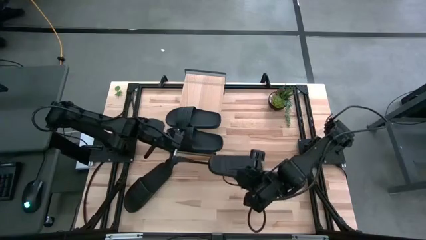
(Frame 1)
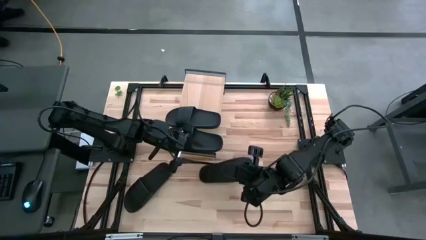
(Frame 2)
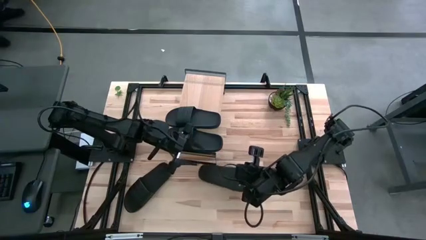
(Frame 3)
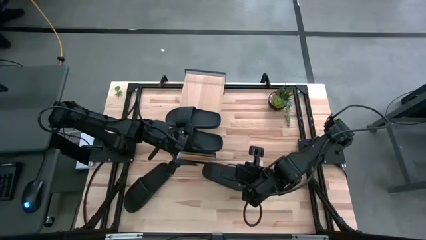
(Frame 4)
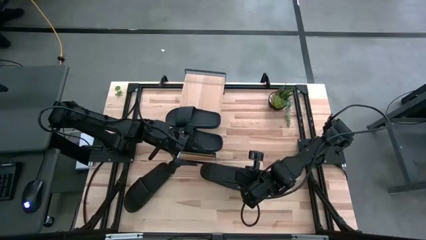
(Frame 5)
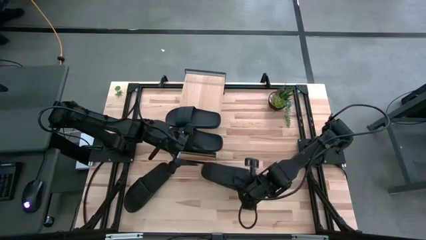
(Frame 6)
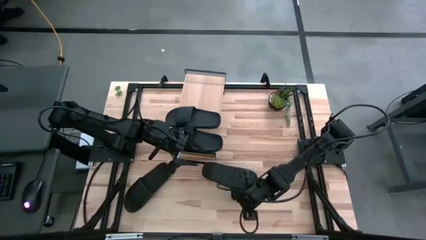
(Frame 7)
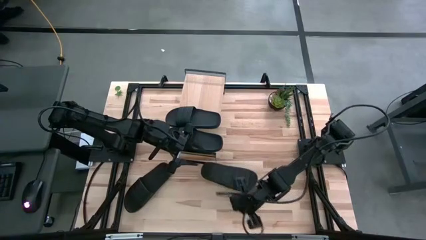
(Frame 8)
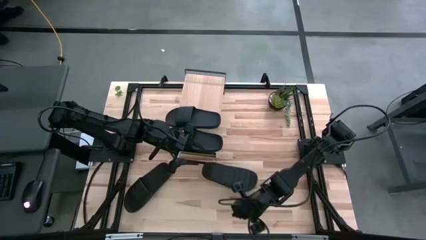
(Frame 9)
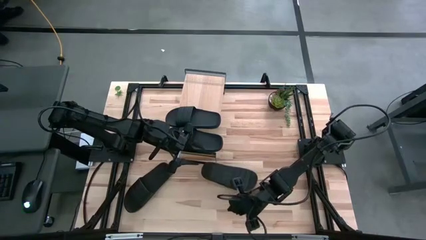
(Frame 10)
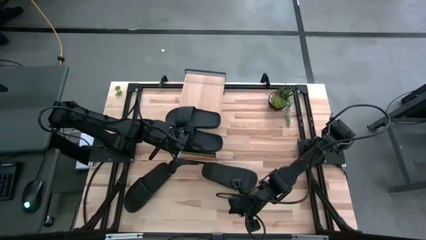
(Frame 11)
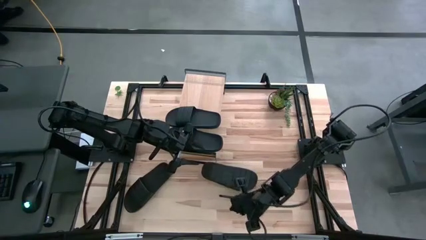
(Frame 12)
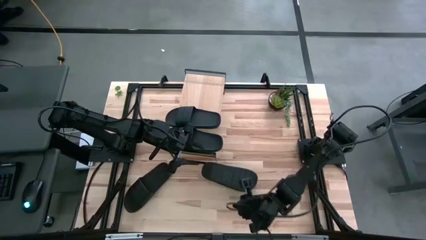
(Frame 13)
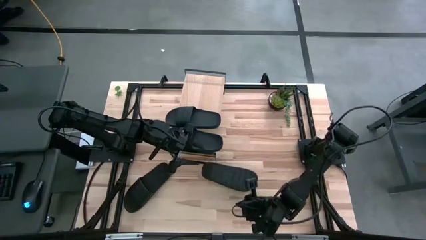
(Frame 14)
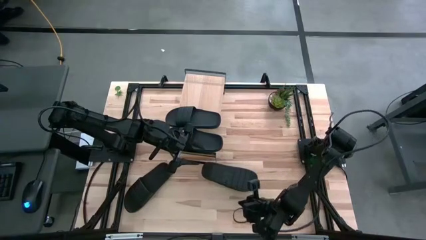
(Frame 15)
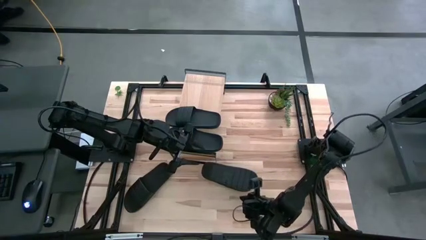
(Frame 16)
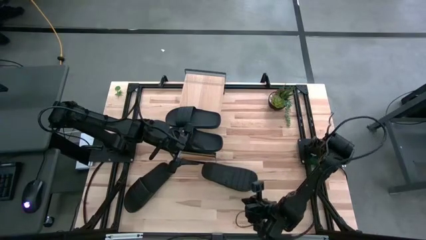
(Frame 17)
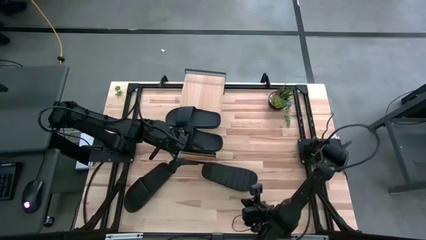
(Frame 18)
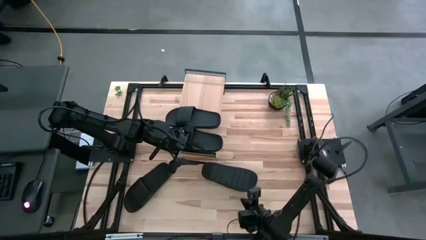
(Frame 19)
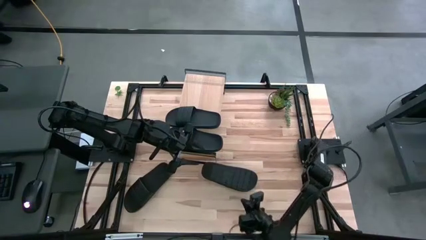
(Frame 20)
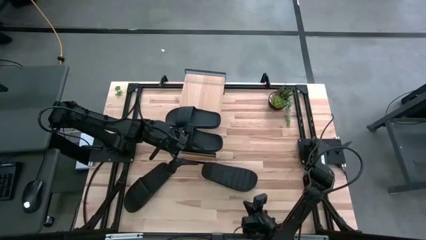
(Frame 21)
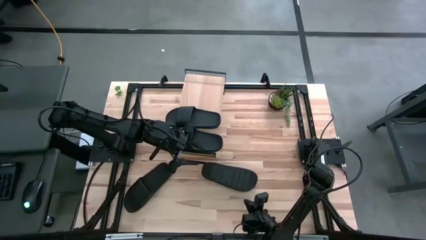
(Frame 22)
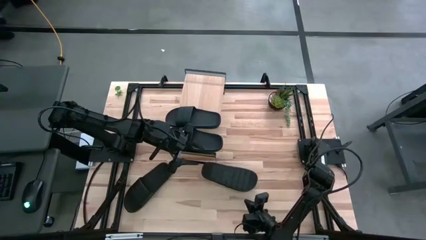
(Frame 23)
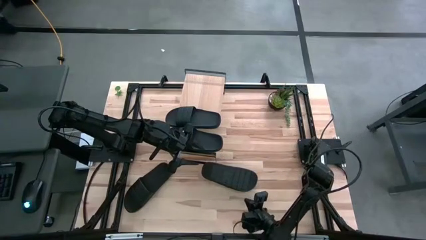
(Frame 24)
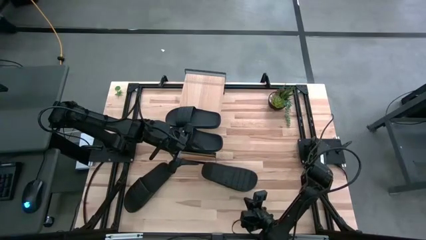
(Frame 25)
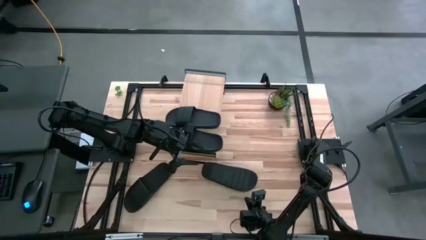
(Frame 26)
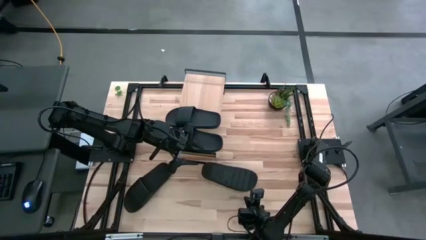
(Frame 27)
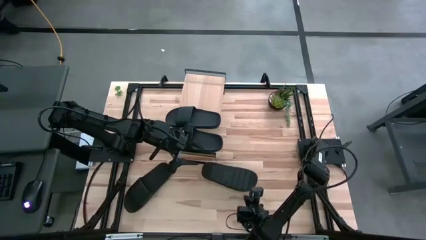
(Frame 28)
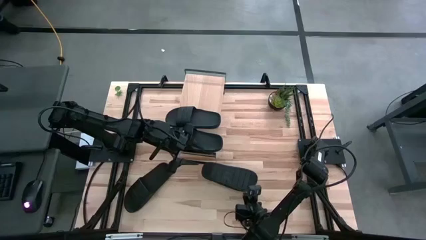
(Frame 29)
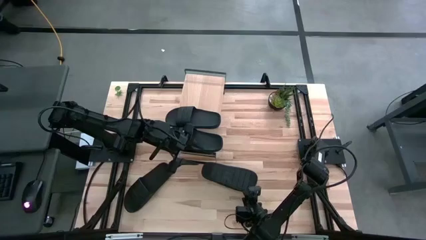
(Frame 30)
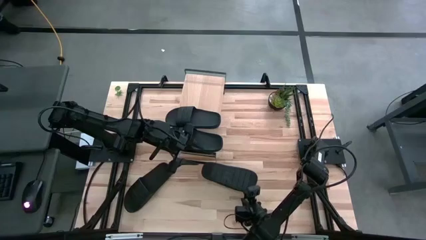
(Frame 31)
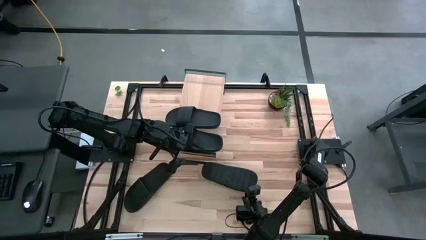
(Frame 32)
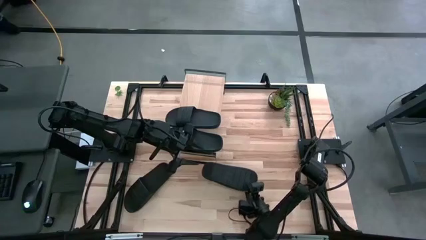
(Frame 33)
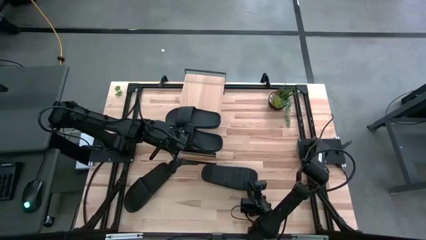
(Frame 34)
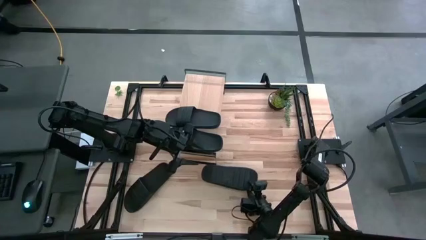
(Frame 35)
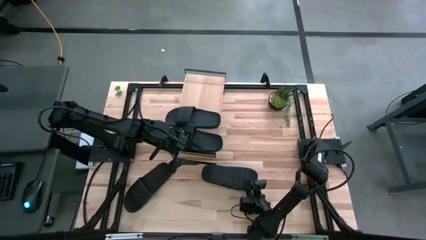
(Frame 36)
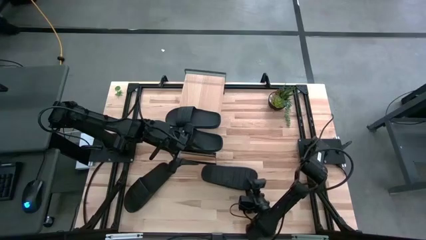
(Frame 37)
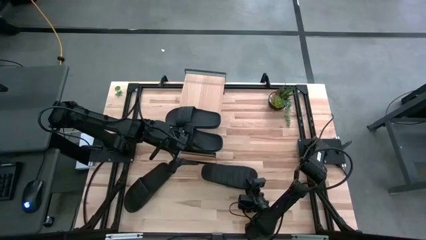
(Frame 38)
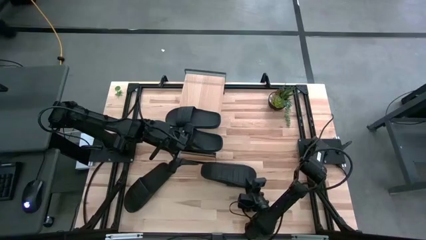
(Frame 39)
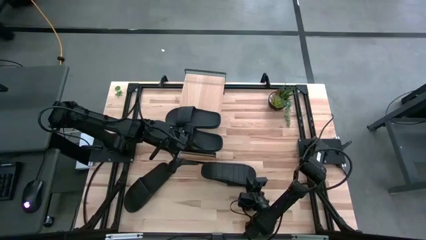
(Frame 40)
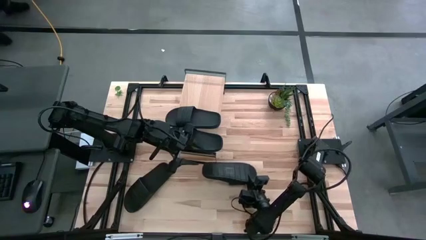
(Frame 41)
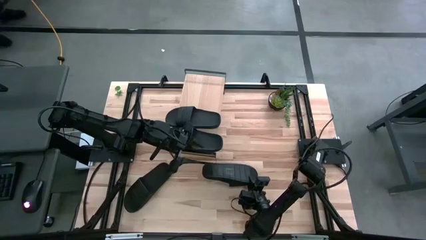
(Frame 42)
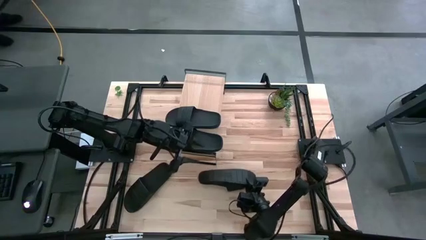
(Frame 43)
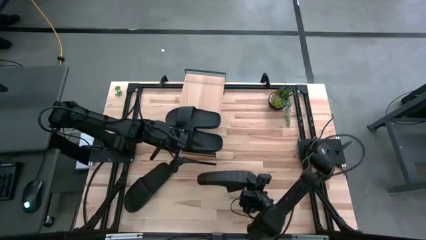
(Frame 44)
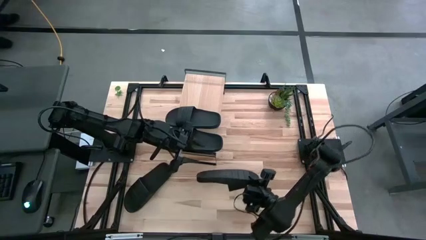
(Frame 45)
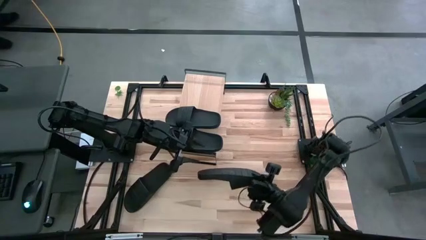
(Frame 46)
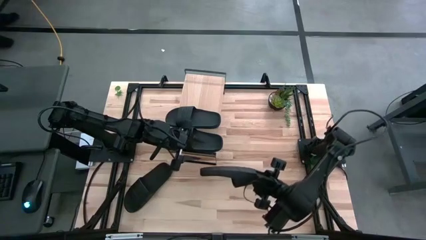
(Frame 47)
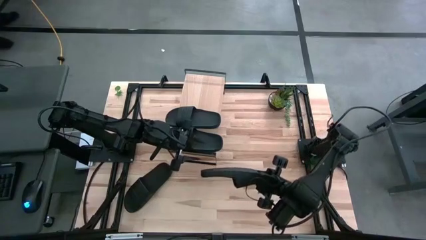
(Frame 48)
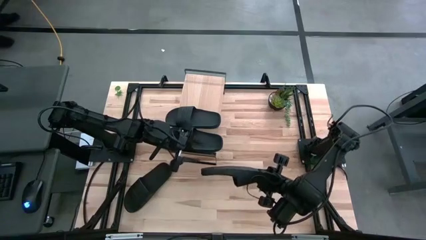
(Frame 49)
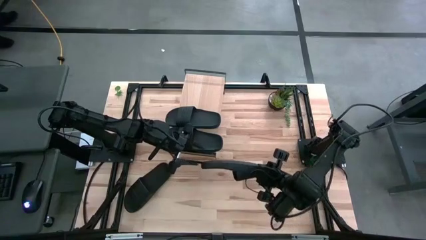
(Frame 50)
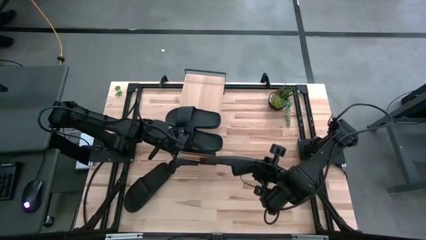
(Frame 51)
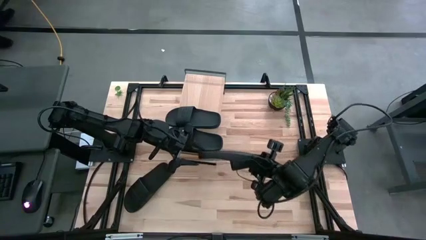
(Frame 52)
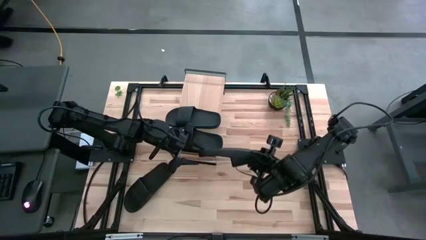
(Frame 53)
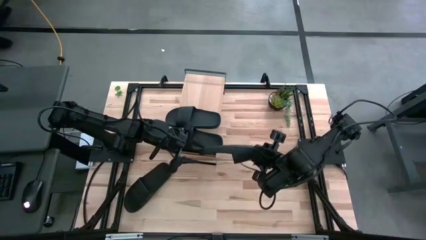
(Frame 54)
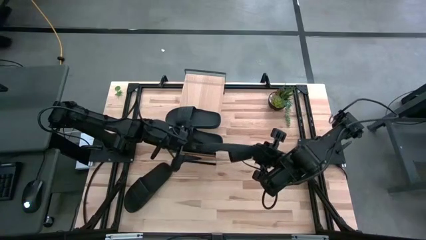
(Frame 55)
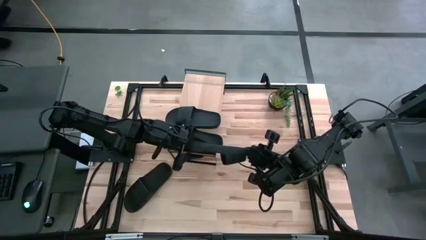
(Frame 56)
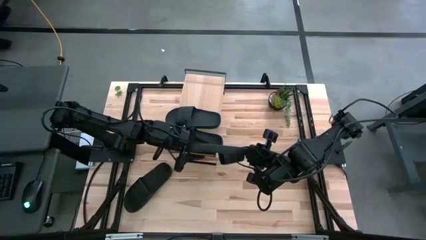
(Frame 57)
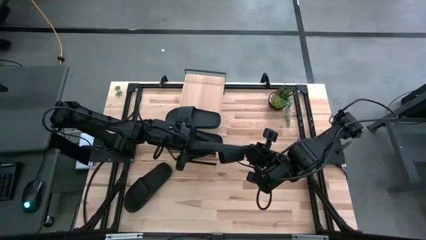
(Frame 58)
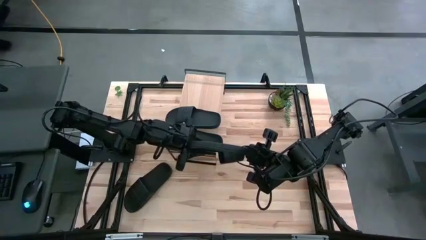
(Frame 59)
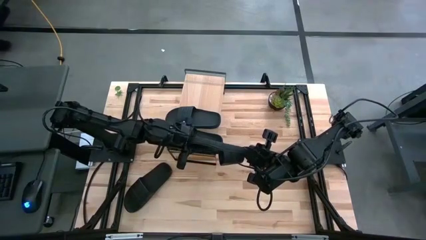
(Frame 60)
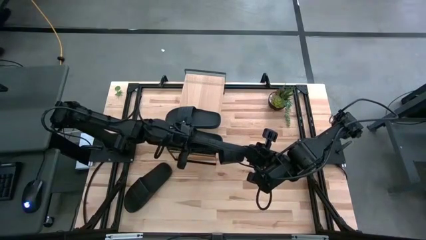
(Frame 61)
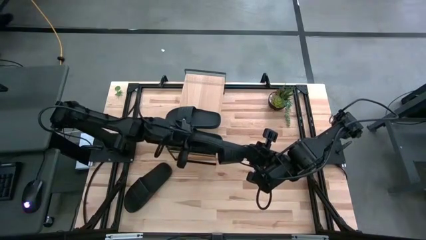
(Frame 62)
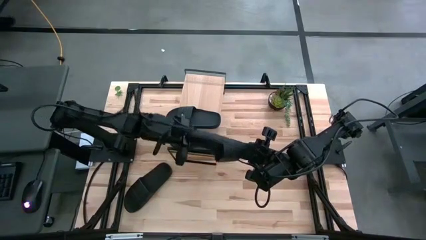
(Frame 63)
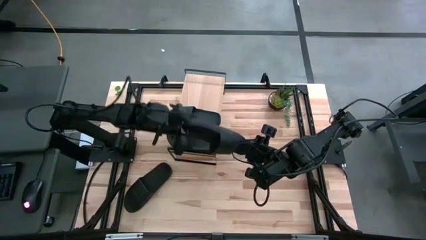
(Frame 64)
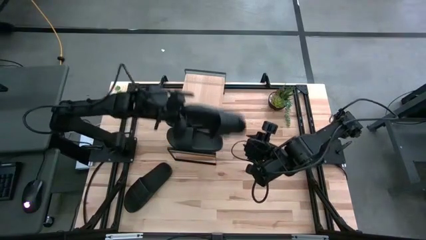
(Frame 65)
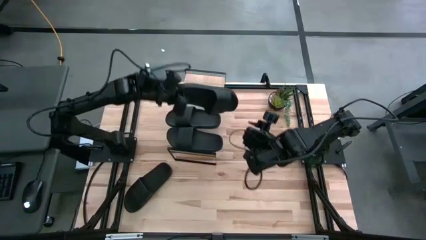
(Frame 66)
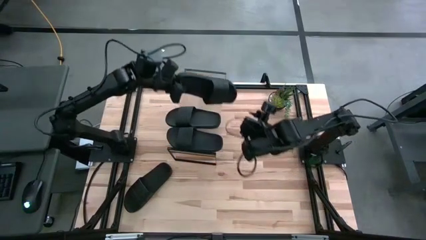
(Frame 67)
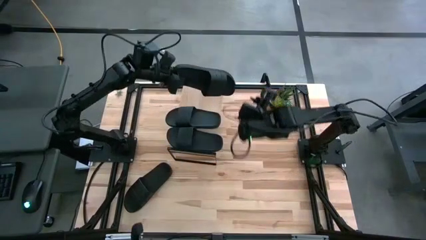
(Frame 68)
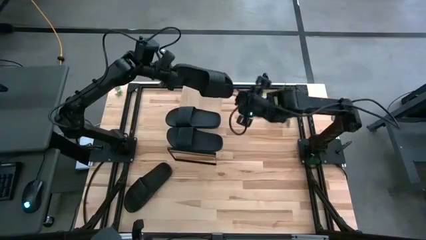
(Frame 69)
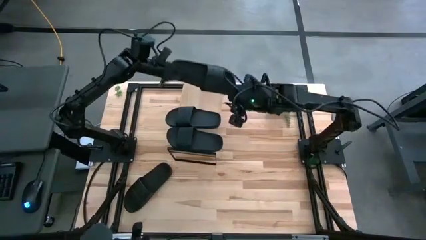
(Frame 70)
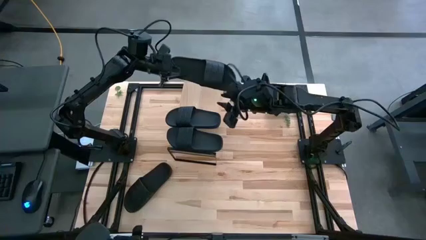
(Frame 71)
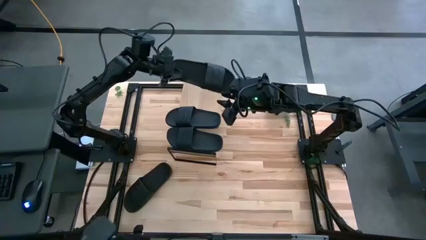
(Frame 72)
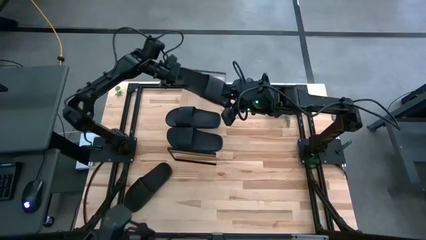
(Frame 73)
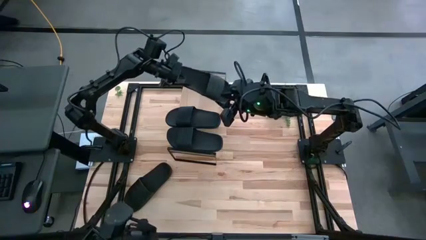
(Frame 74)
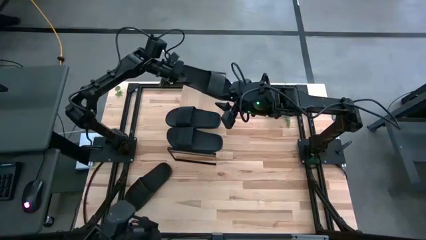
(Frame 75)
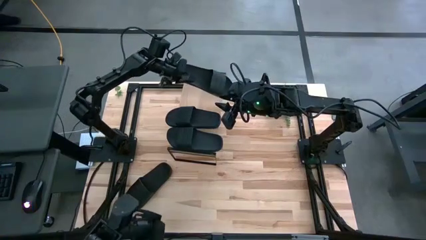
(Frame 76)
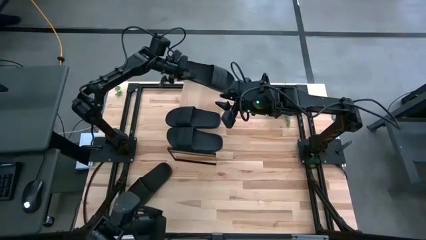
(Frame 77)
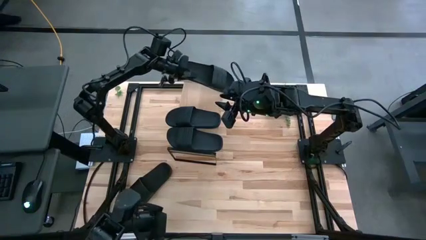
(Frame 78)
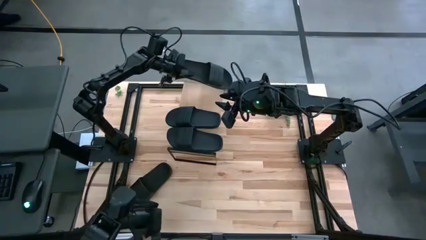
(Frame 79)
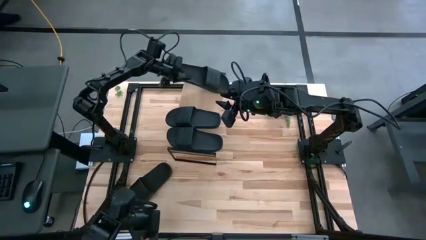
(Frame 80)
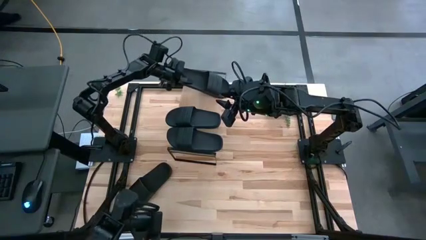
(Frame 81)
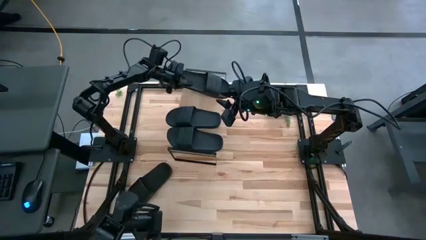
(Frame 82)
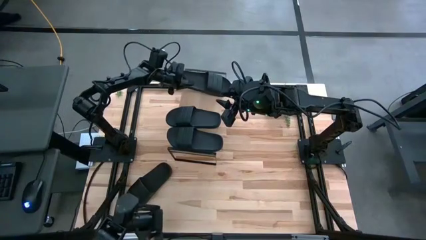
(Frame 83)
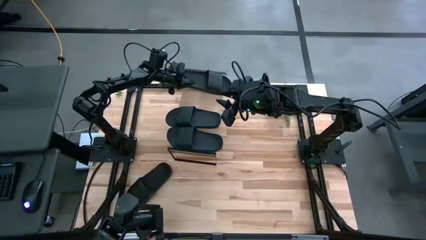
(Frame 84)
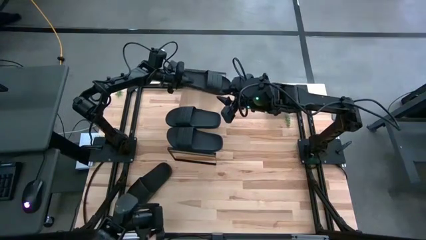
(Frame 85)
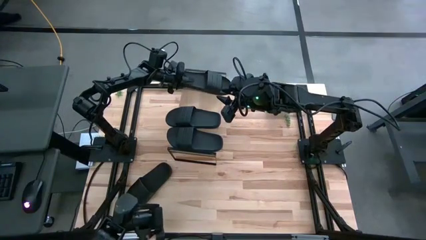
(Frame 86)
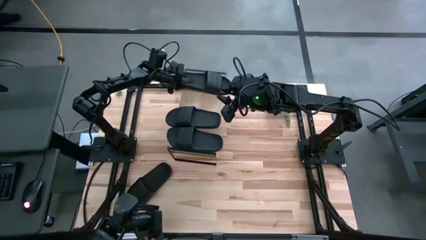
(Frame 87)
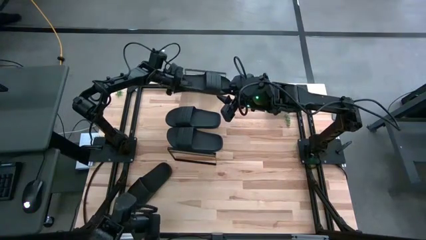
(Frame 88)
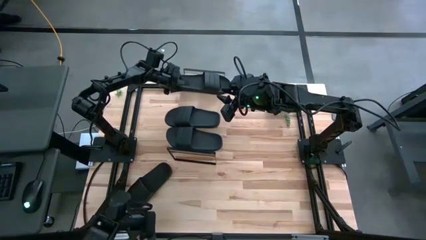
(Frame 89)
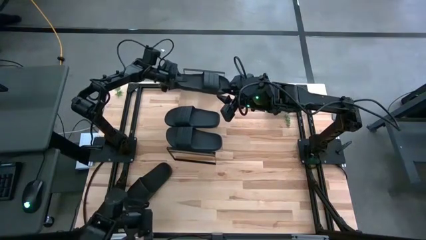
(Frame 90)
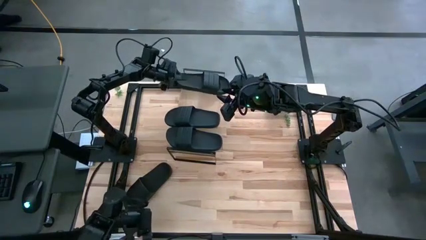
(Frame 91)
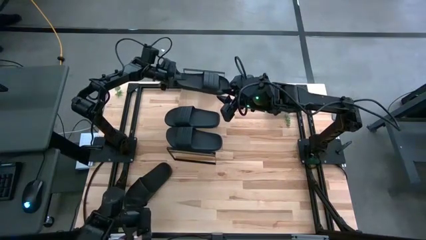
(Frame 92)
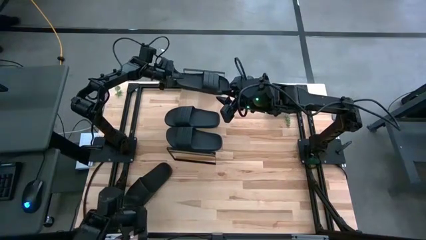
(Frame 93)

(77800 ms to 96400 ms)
Task: Pick and place slides into the shelf
Put the right slipper on the shelf
